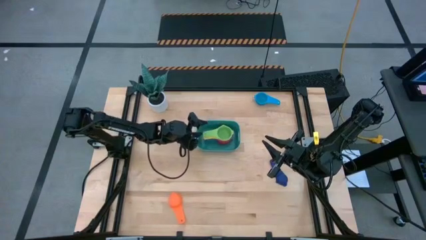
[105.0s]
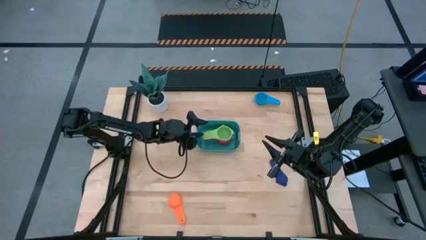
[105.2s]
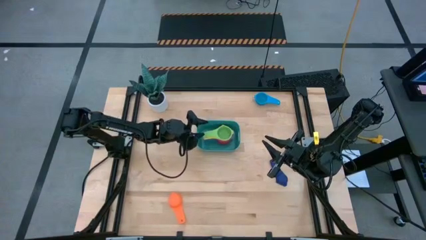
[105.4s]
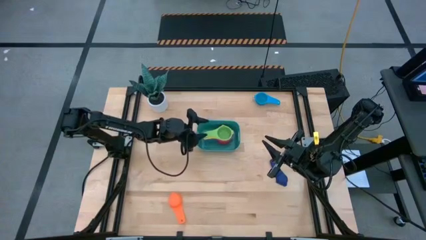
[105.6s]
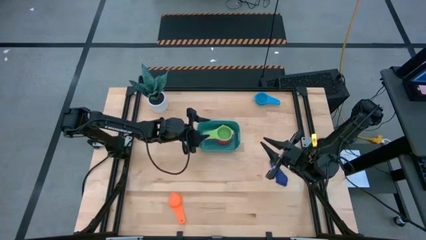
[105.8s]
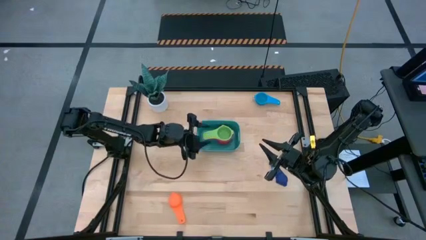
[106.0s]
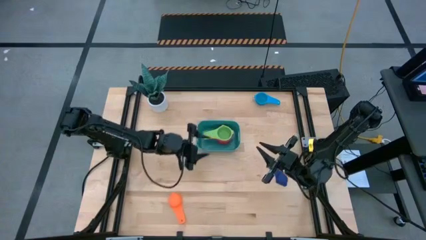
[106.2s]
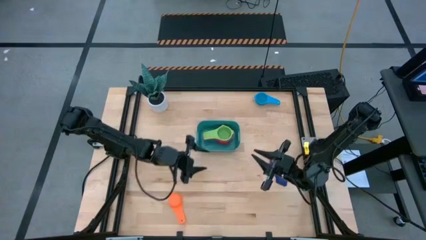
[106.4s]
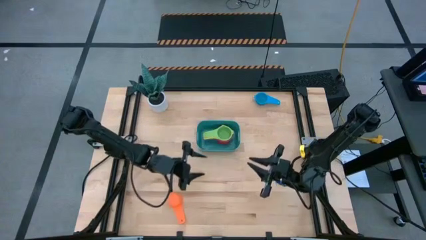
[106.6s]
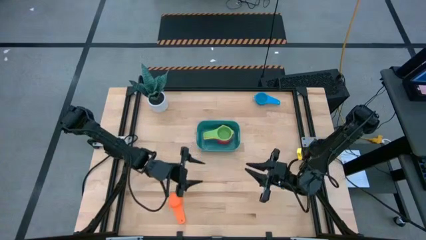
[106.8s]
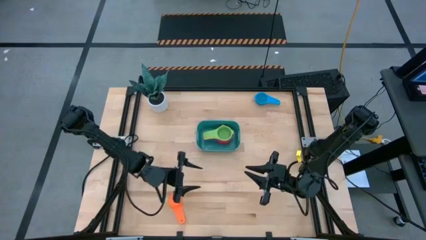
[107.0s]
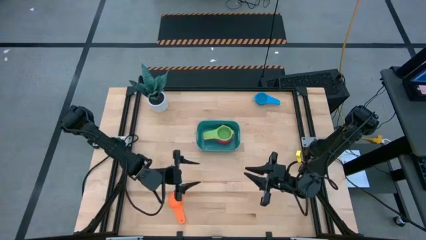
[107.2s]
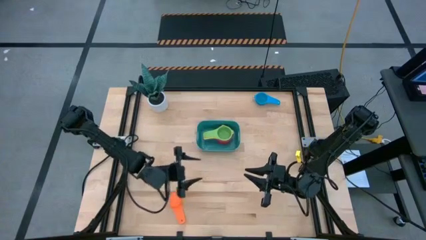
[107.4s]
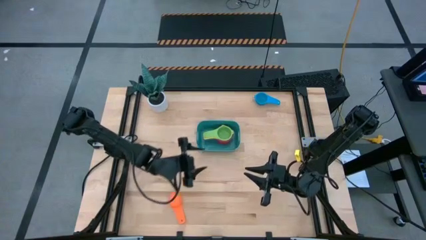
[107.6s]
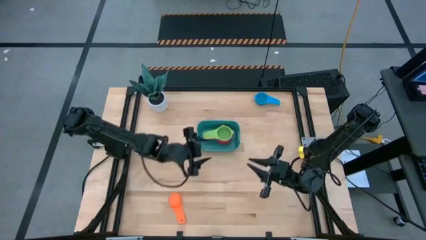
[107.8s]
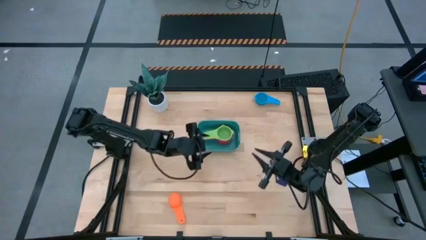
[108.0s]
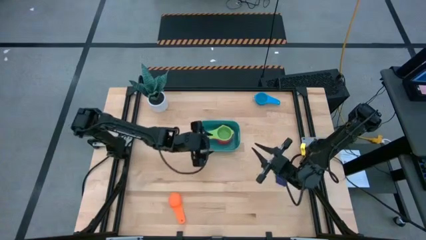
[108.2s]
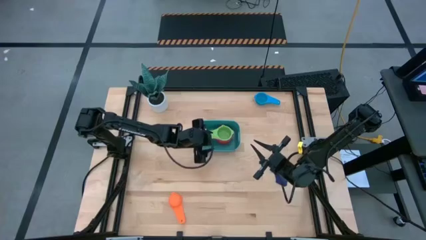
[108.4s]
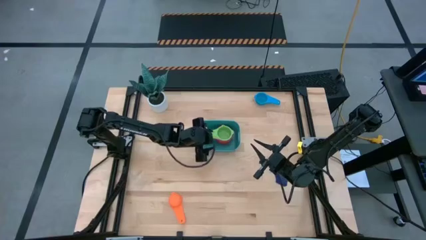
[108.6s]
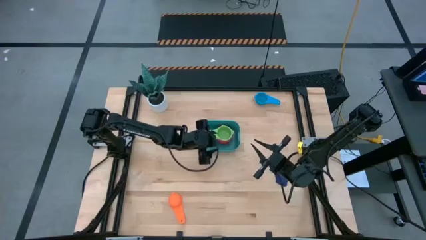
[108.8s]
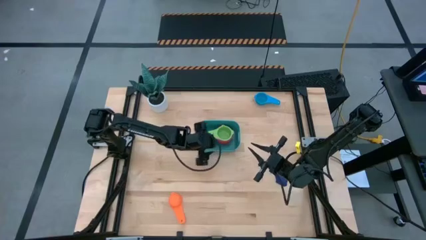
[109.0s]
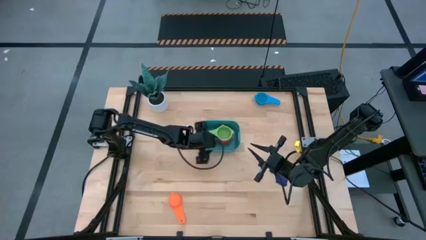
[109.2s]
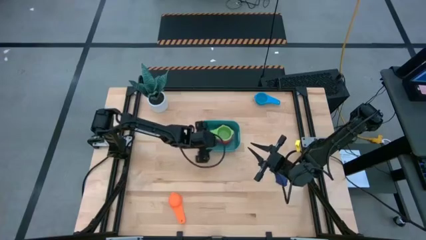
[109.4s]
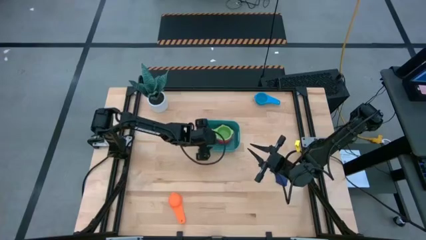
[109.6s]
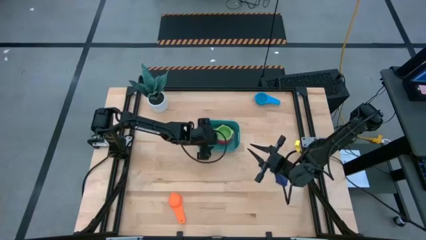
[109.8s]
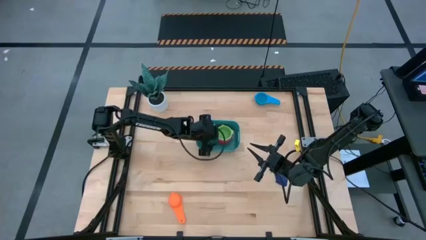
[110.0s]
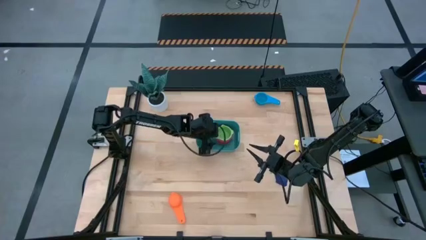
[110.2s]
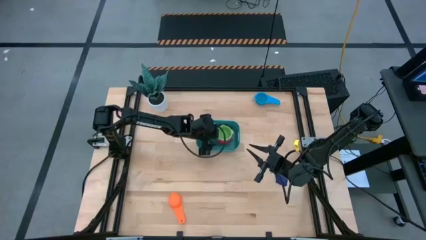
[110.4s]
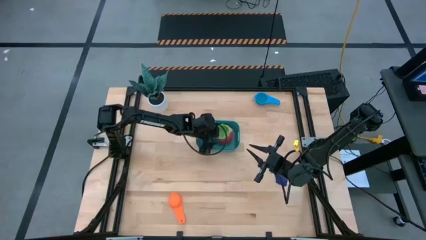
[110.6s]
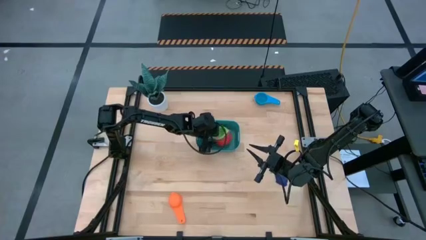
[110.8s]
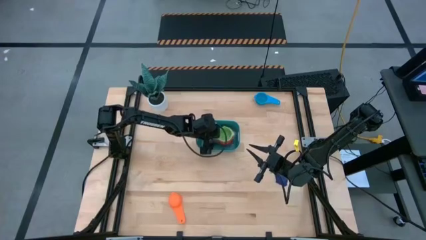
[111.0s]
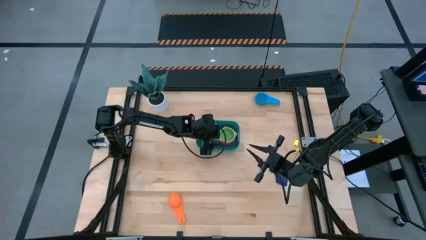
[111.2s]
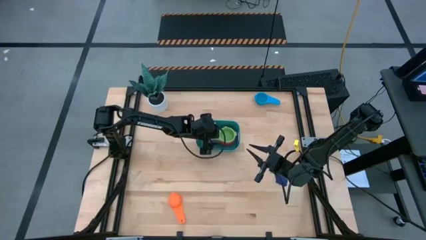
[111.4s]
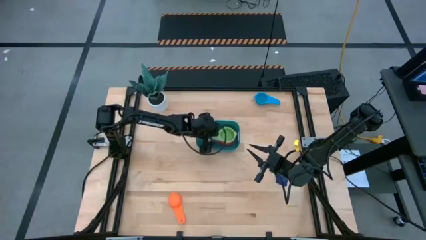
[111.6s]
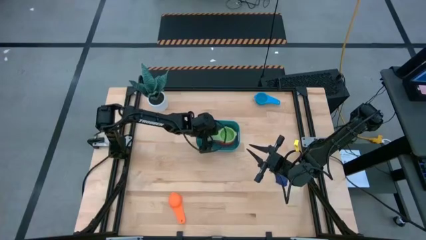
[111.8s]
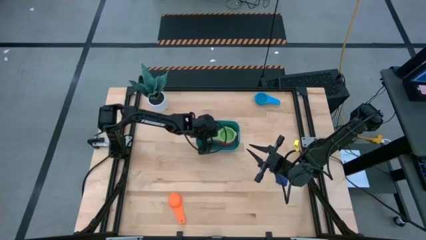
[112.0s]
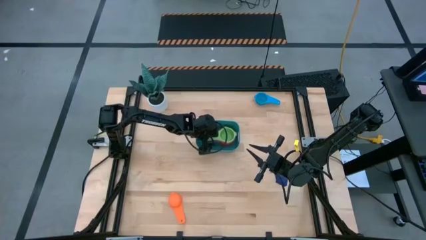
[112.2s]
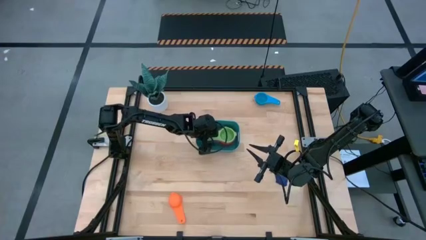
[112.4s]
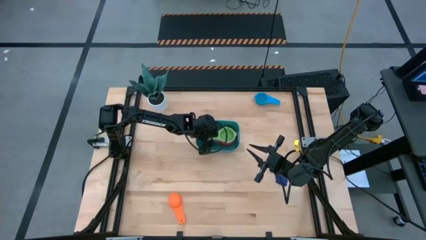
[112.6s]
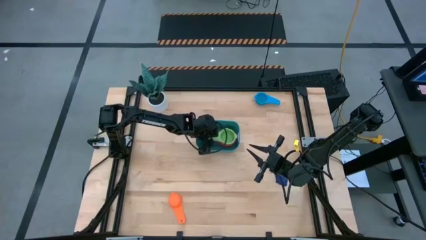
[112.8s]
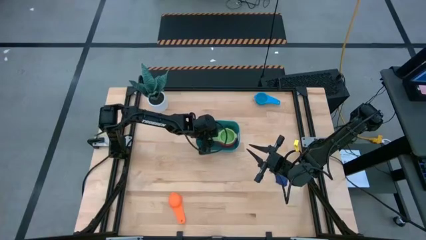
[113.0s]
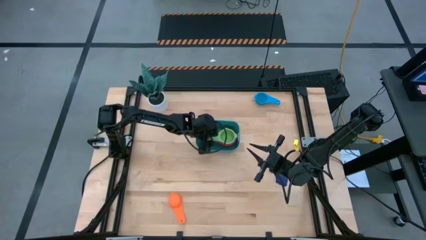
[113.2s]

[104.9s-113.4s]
Task: Nest measuring cups in basket
Adjust the stack of measuring cups inside the light blue bin

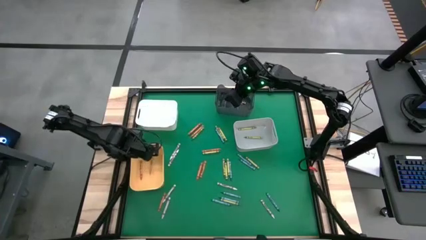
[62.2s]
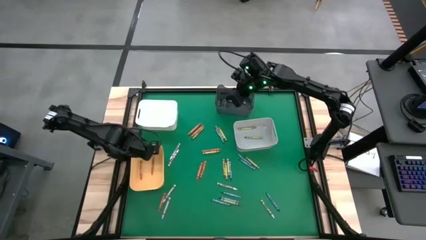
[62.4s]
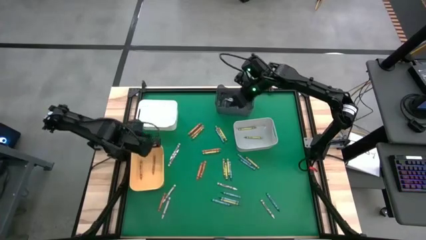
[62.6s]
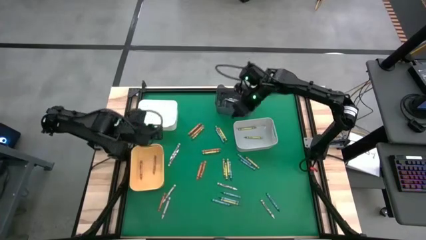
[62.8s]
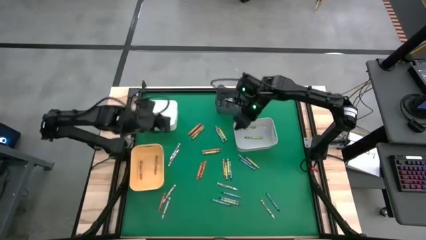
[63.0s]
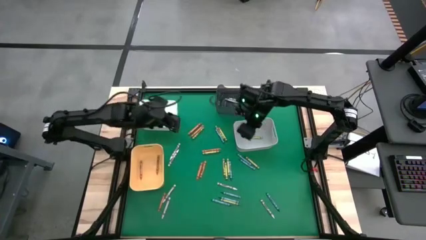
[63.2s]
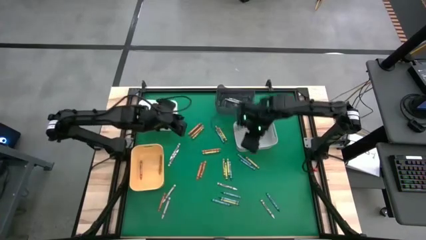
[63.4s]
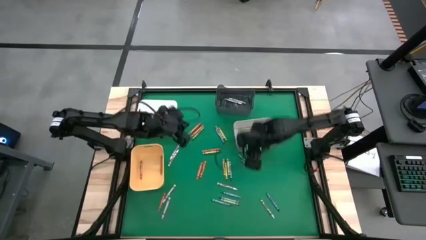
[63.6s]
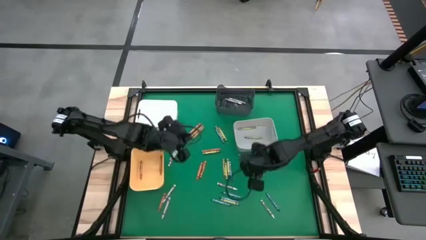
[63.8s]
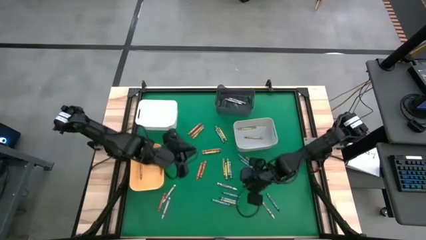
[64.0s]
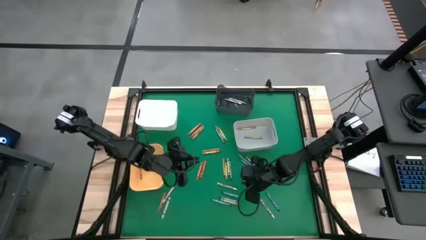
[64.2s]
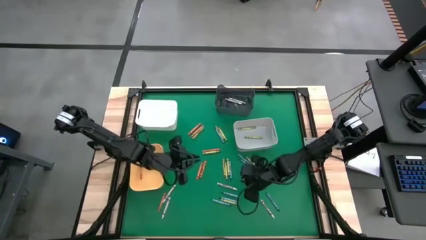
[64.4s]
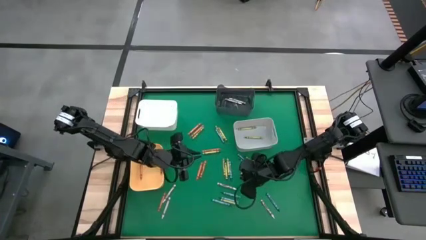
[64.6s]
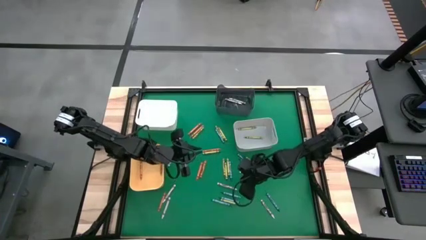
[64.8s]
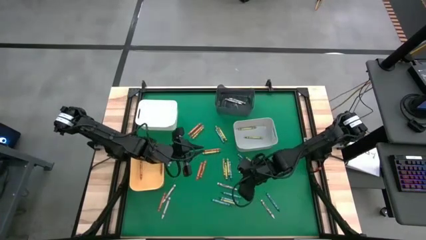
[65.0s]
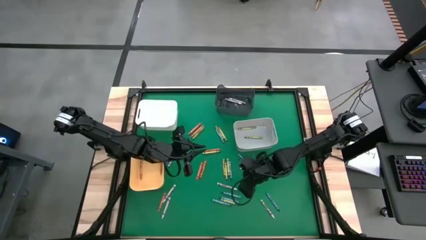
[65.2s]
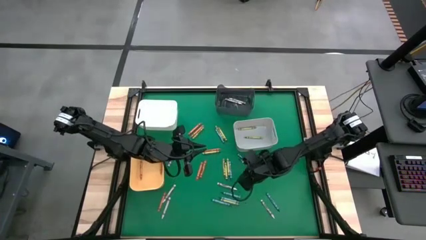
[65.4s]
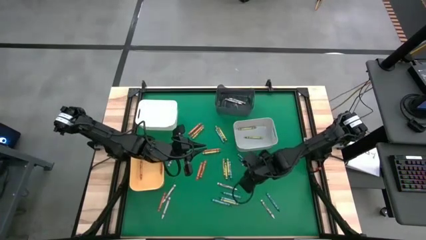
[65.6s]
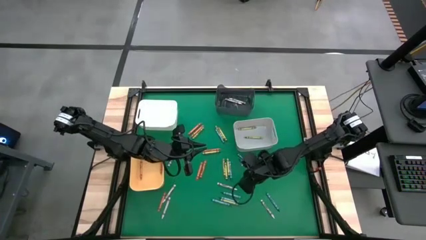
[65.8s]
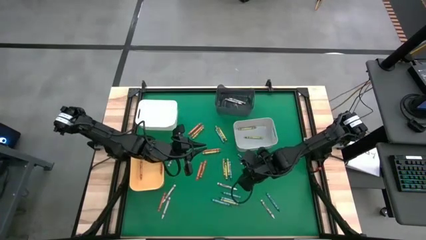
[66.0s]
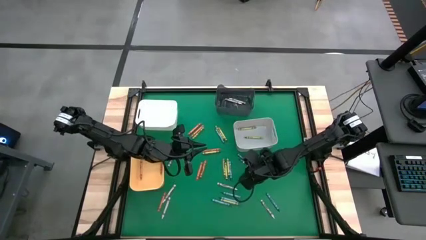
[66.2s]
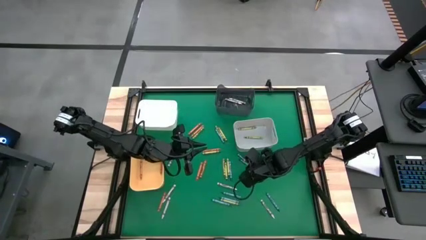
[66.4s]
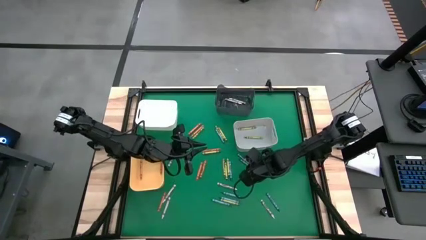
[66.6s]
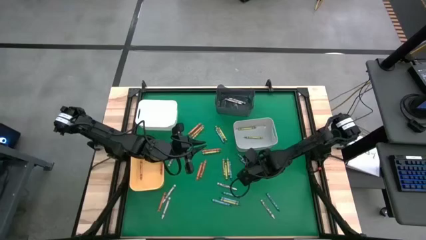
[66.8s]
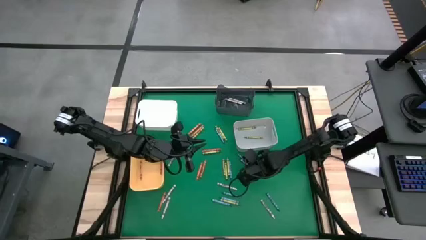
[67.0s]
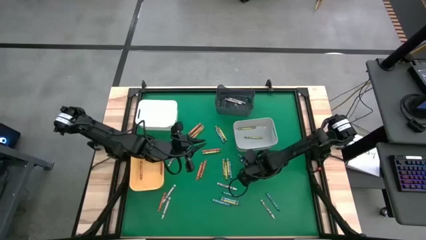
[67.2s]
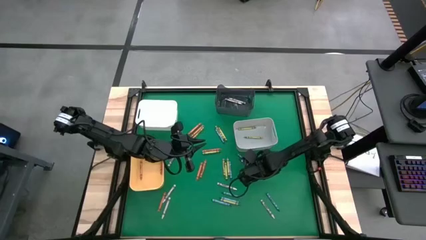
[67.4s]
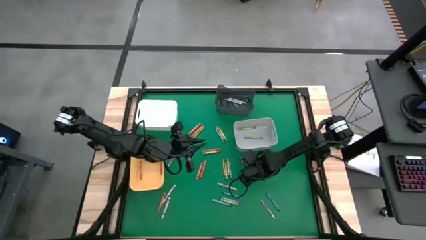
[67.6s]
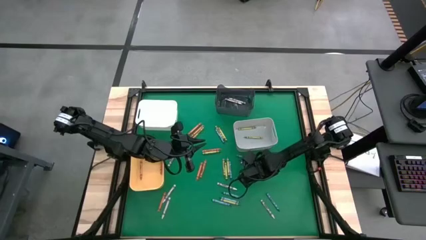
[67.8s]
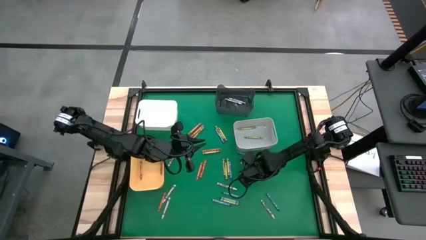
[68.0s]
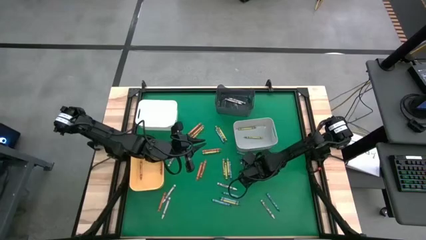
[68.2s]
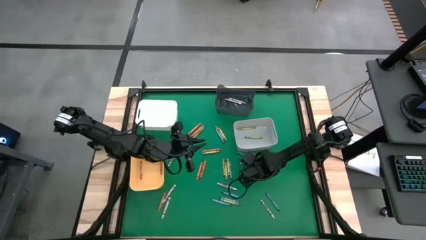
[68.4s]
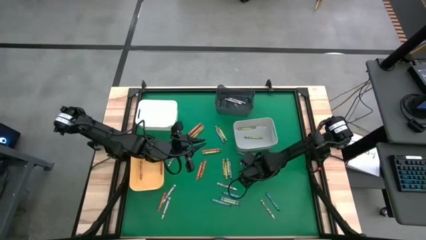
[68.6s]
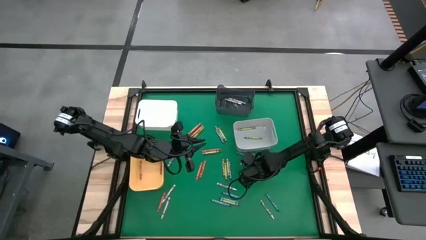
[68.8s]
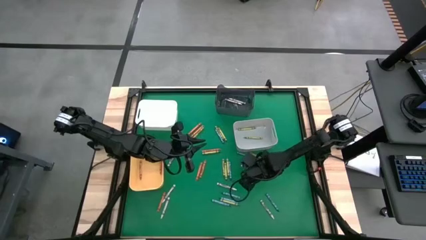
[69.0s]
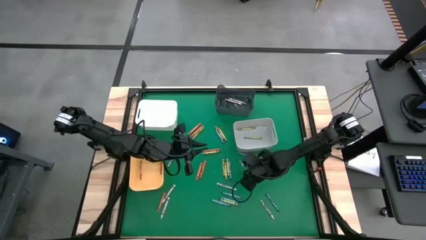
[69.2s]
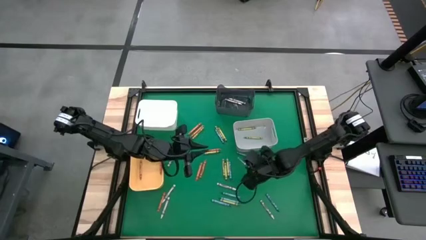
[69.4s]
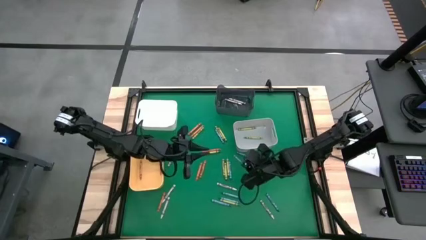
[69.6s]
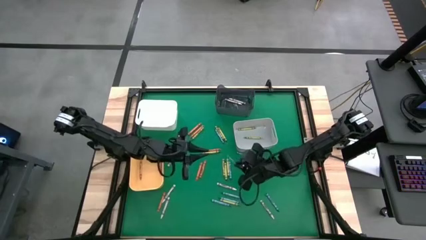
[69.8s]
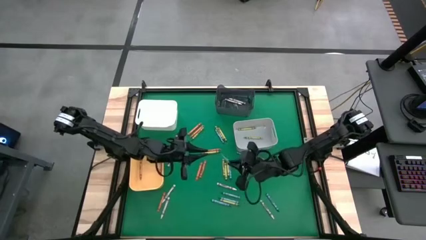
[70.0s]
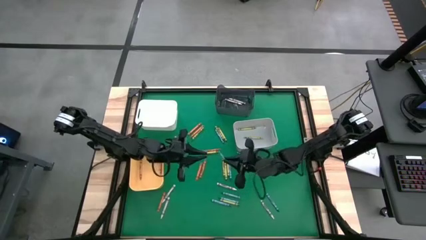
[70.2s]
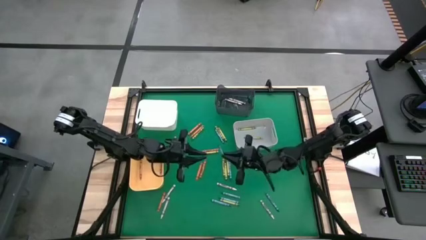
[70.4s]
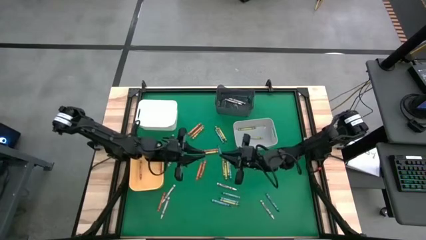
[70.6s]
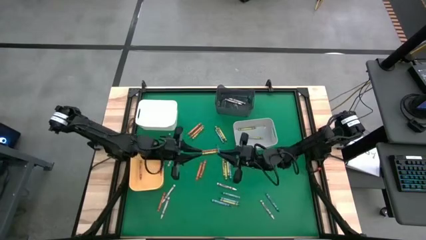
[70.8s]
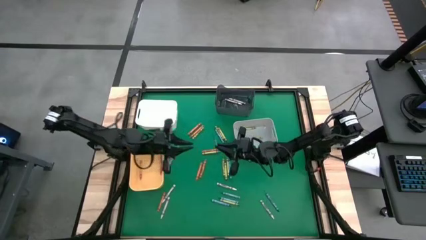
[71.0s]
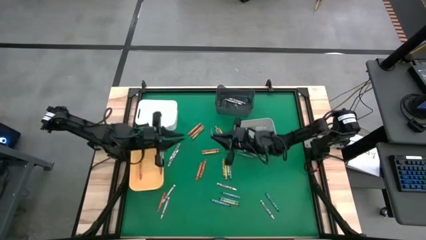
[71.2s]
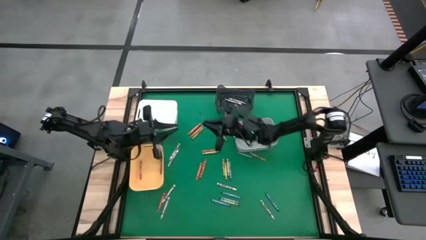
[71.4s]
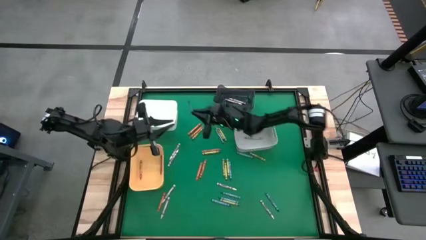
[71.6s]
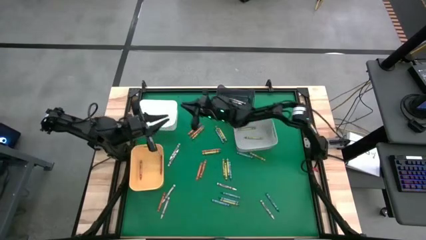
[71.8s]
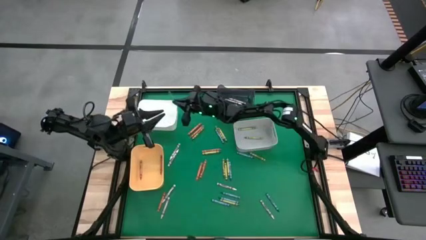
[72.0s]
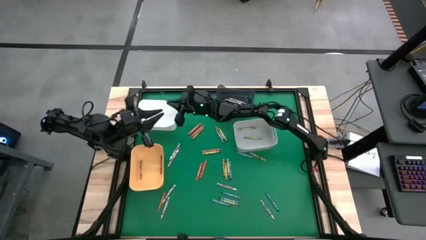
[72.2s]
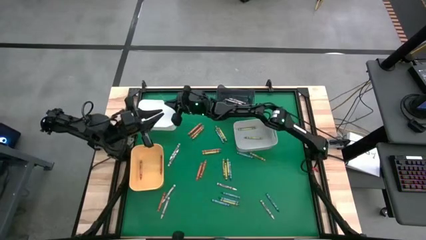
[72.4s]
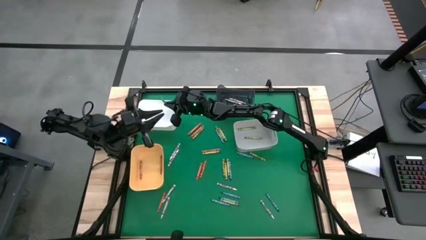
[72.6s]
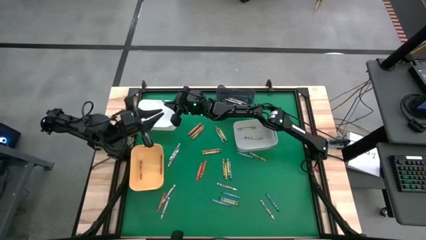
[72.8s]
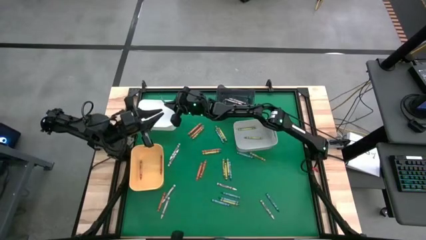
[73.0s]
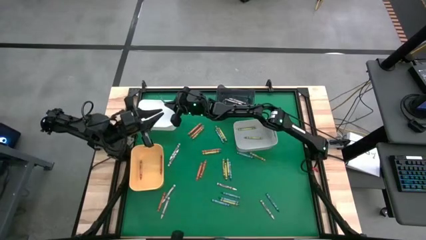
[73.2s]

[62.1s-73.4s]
Task: Sort crayons
Put the blue crayon into the white bin
